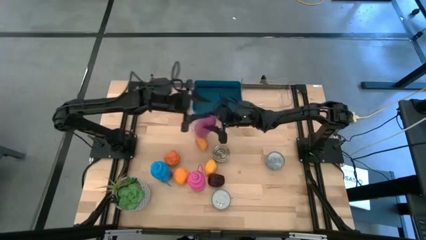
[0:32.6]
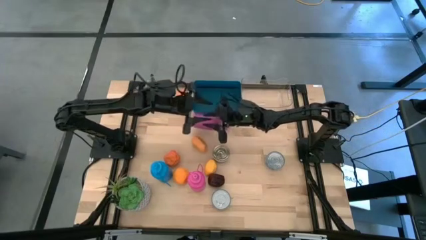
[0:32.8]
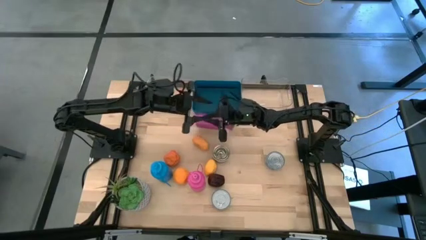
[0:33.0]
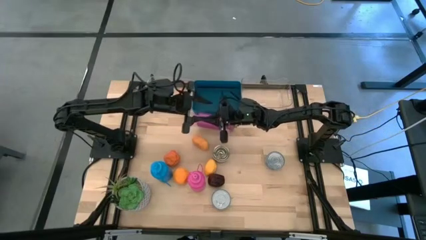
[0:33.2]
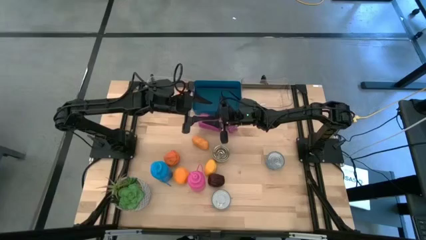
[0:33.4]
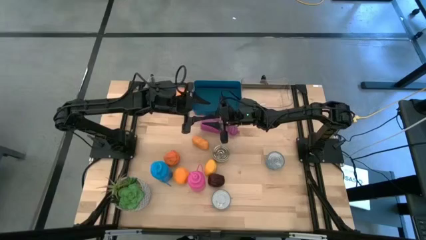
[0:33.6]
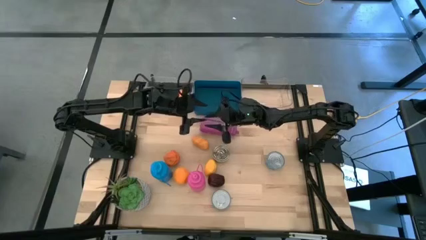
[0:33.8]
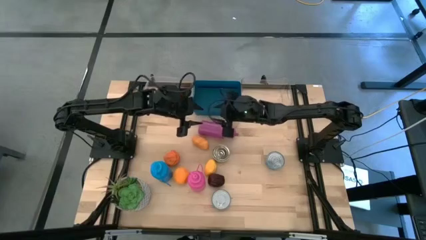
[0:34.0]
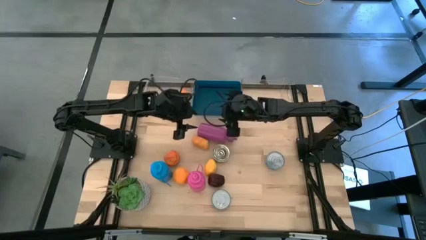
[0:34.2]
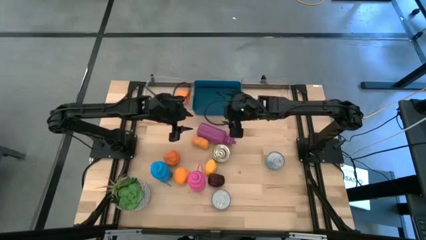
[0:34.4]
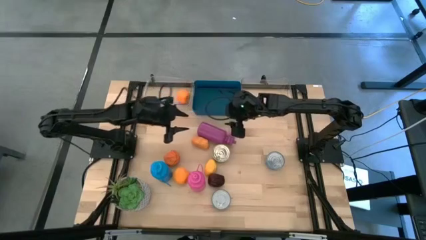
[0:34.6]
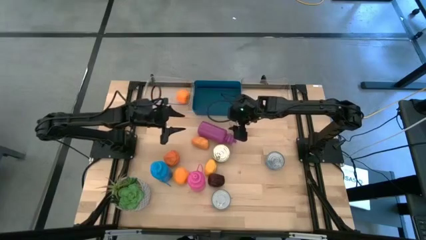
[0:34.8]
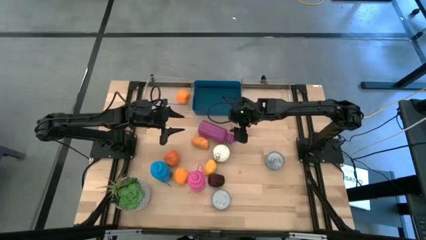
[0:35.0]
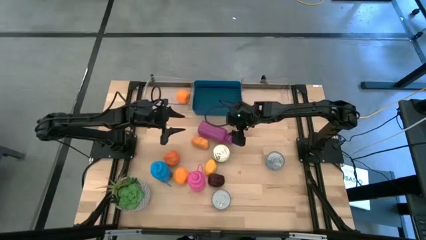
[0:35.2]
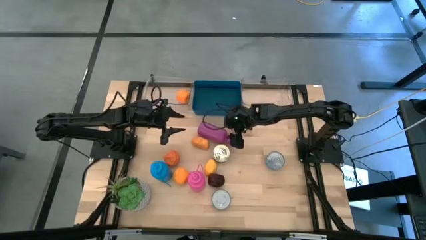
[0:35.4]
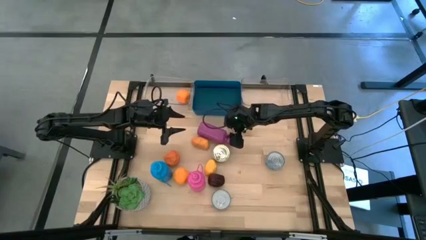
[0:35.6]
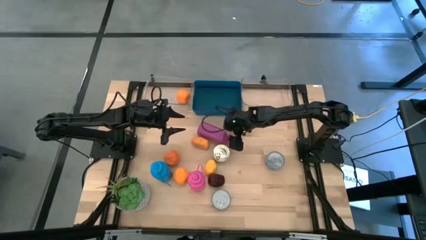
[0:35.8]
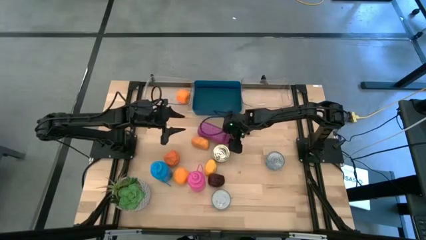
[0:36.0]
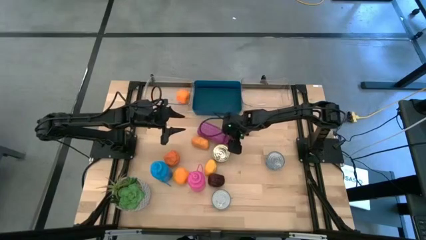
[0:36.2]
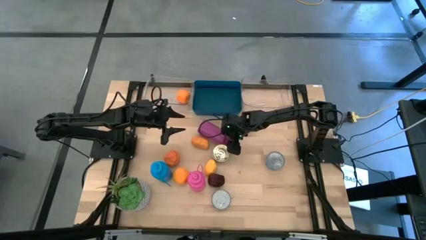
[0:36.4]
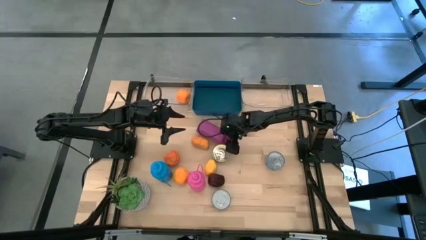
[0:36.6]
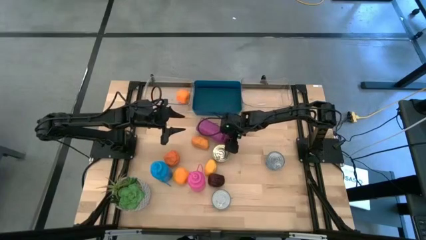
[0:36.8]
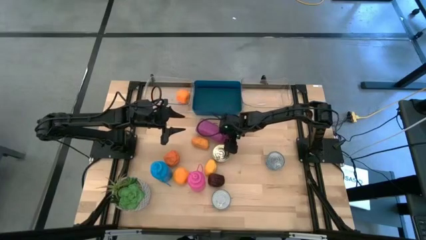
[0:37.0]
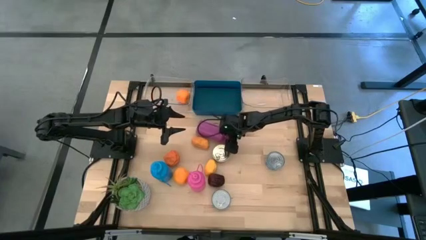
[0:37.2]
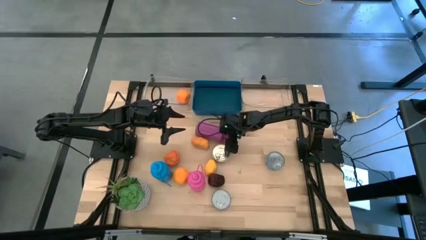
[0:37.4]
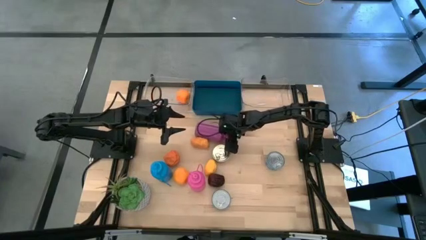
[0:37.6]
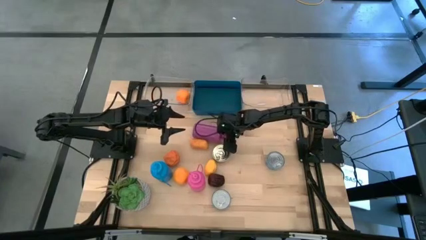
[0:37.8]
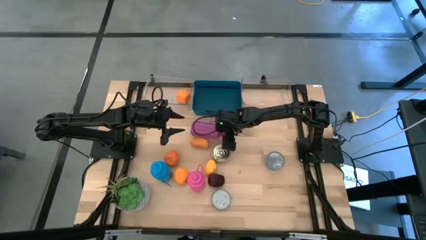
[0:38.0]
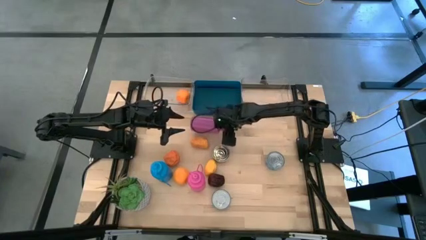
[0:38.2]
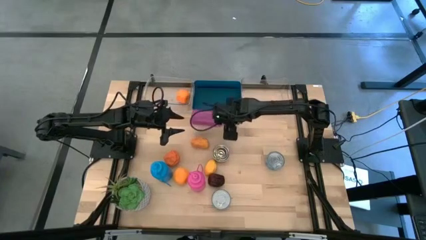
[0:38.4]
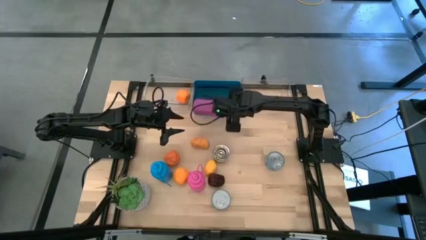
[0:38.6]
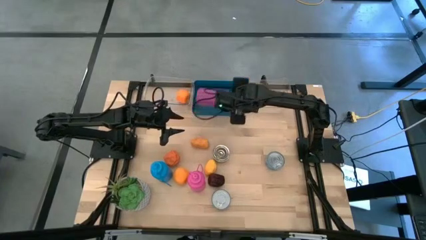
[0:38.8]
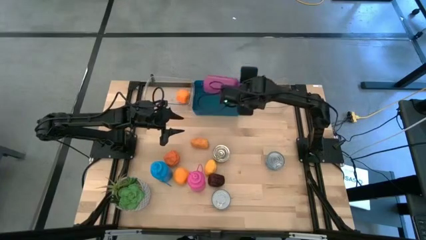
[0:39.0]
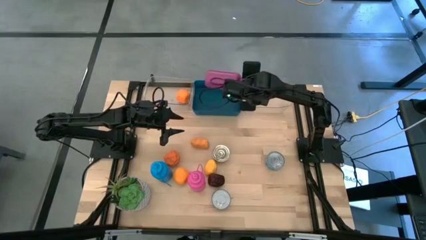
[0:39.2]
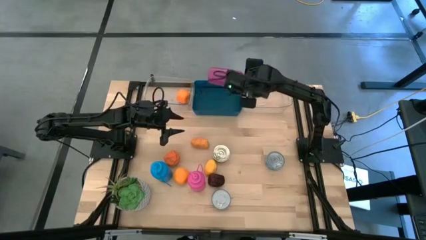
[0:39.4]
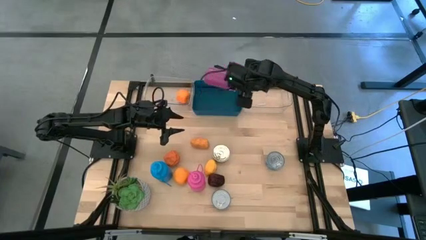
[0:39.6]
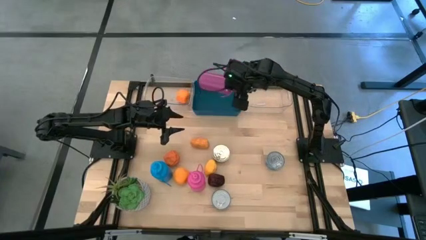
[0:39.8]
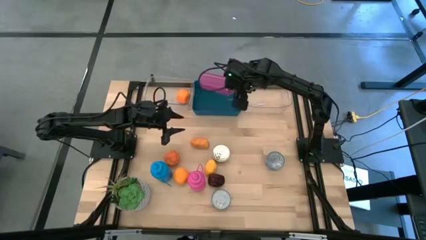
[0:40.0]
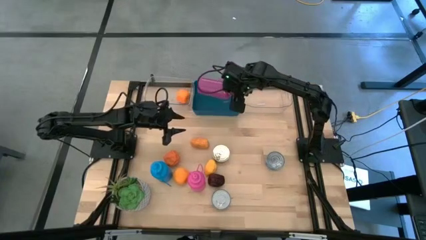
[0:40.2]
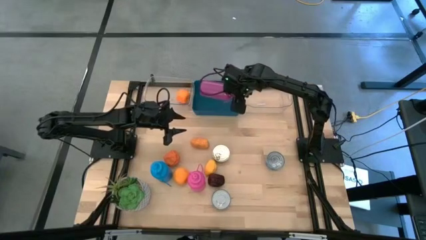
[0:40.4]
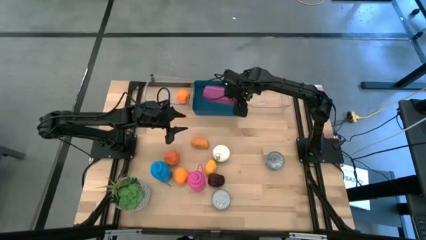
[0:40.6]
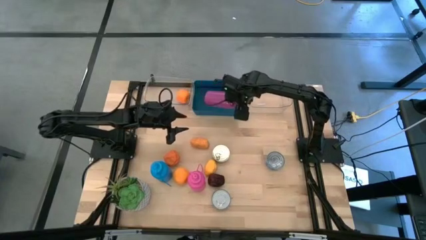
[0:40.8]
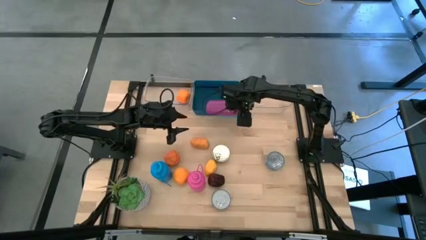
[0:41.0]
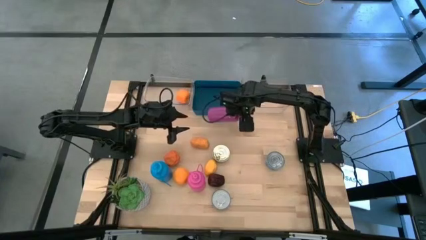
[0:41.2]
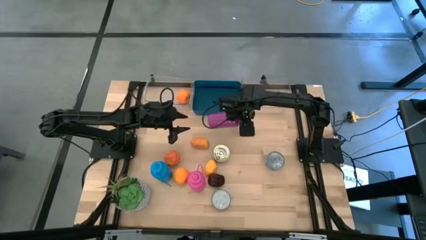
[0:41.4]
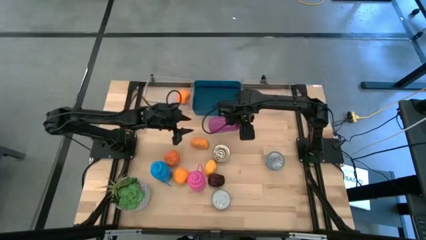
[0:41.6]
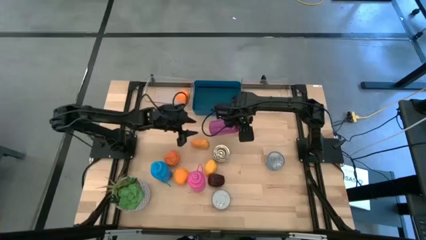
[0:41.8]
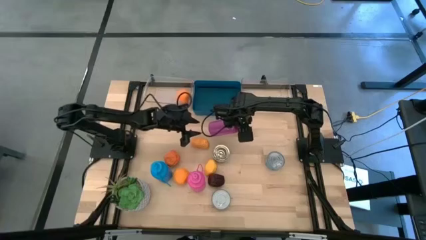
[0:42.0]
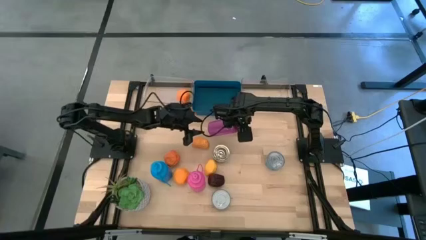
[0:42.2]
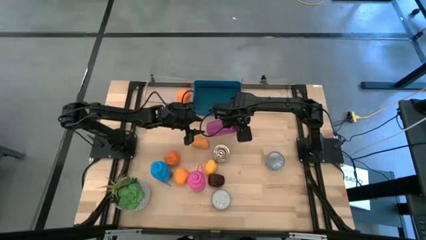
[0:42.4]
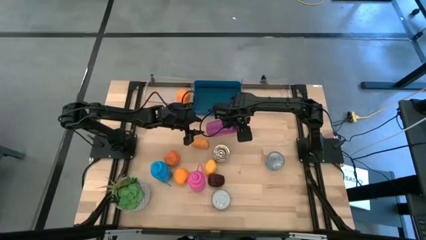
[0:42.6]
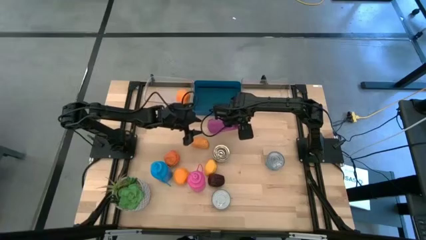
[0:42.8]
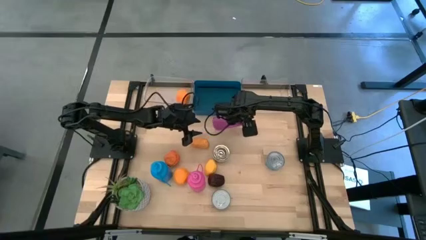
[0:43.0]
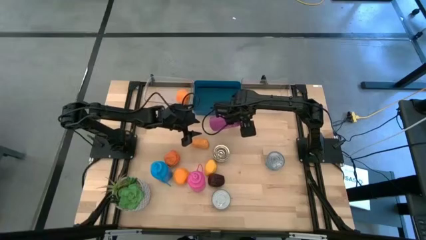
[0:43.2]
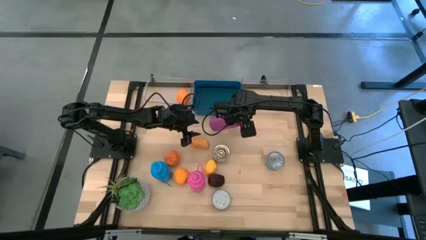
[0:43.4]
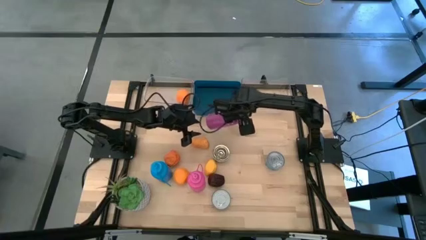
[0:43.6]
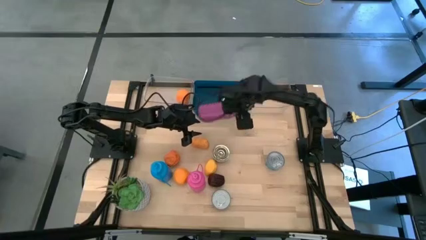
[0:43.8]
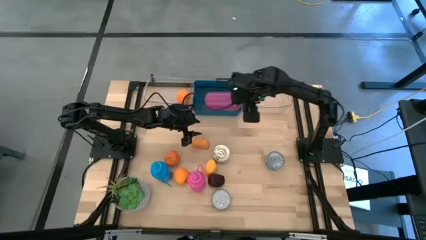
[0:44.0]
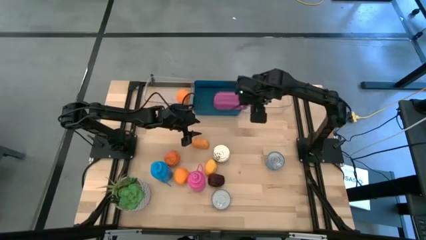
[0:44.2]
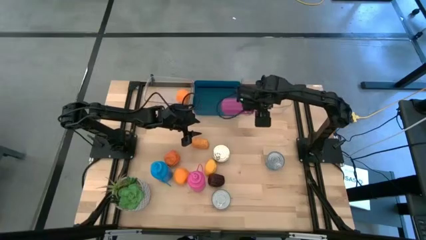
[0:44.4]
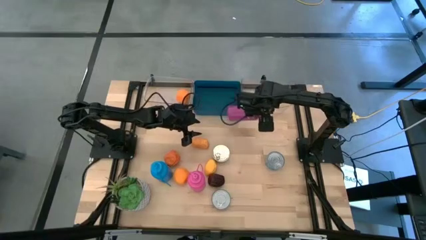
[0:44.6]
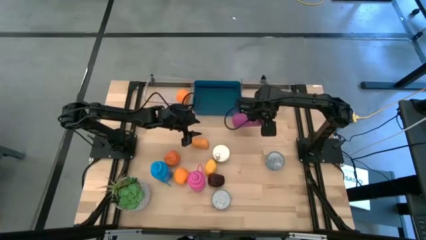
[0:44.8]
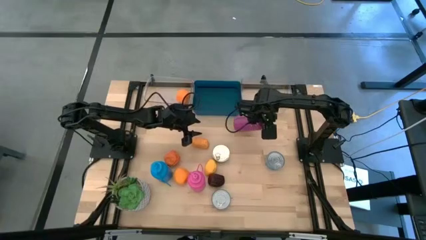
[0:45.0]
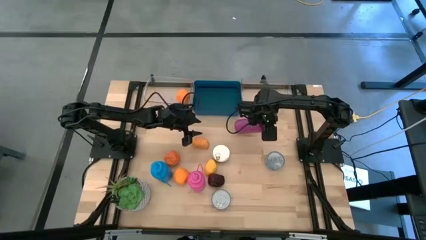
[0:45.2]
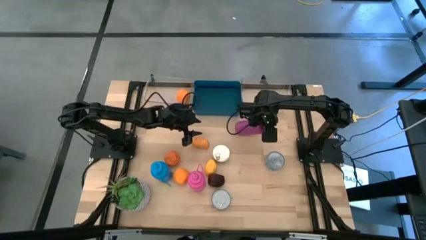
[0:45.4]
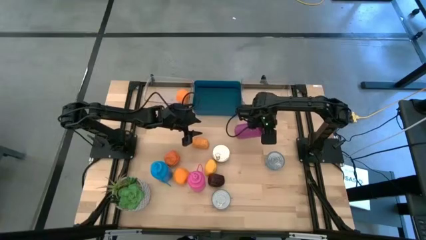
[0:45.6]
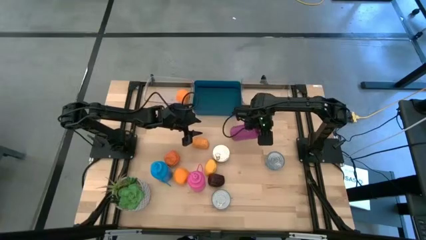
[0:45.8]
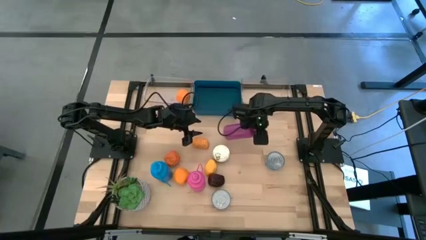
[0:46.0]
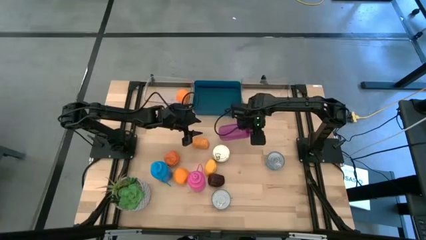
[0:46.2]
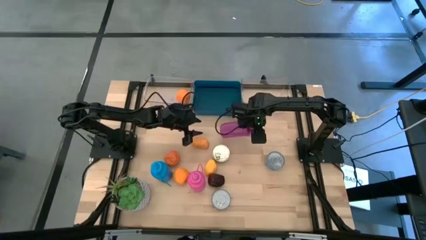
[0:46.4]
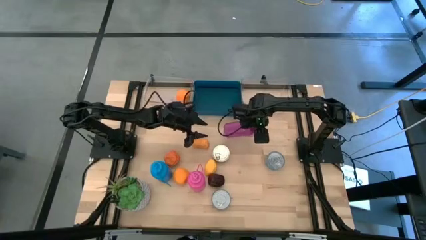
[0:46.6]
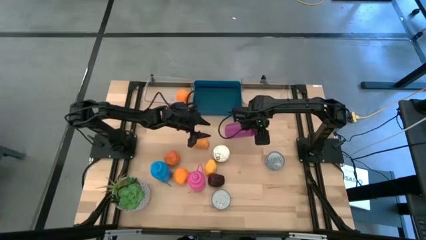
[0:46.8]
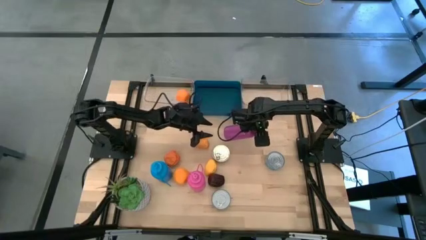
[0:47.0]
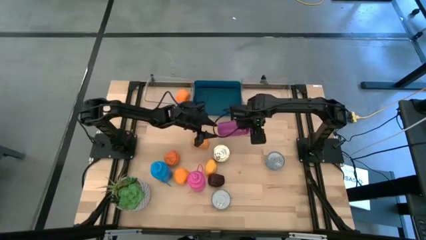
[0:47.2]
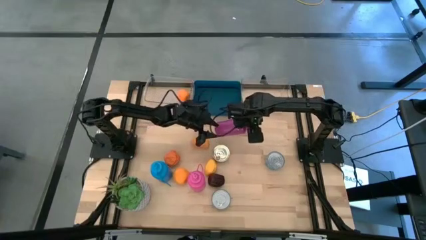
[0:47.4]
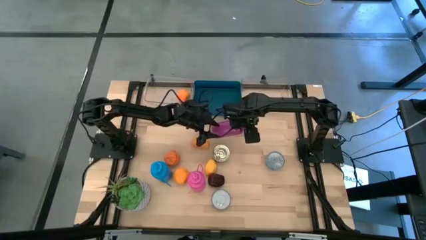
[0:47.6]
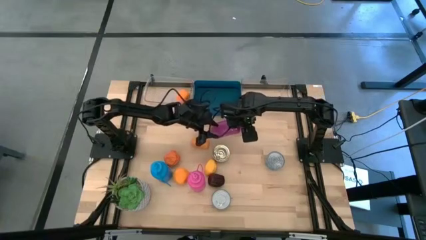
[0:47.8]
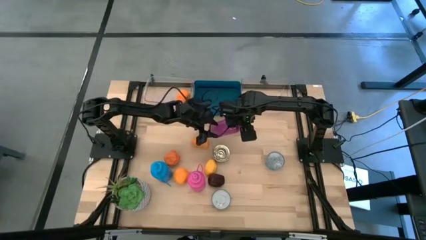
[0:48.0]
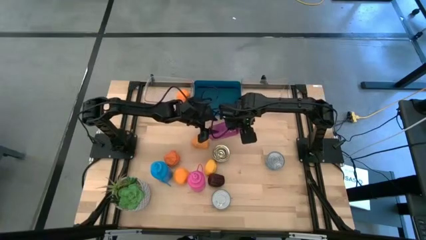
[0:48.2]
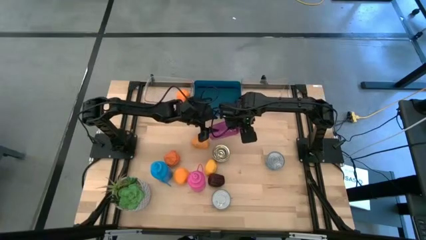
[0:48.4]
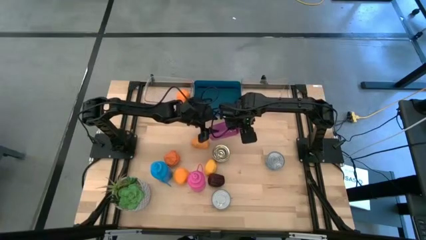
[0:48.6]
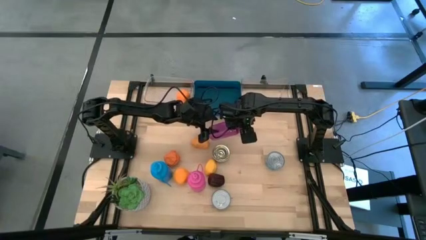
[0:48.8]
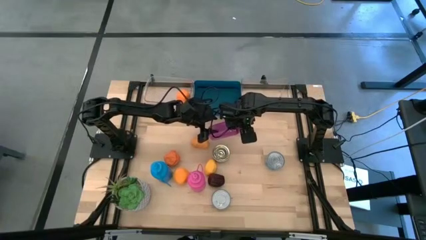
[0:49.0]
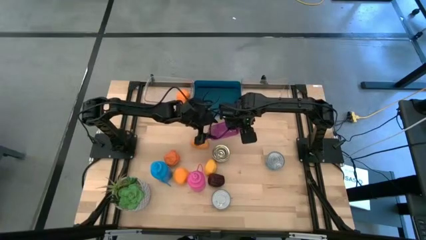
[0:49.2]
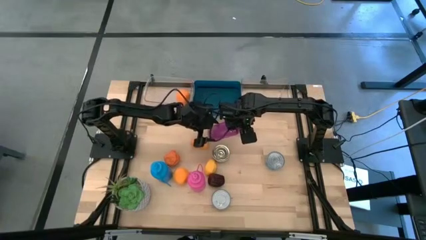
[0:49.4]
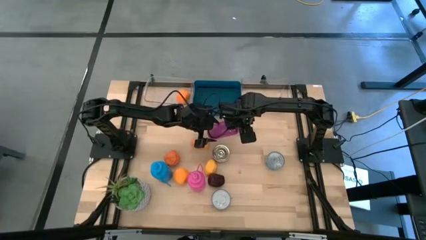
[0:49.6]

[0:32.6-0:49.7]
Task: Pick & Place Food Item
Put the violet water bottle into the blue bin
